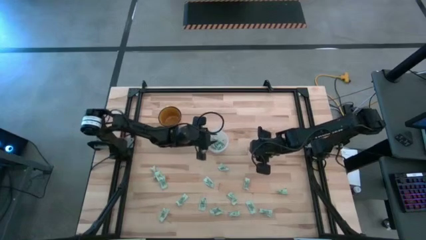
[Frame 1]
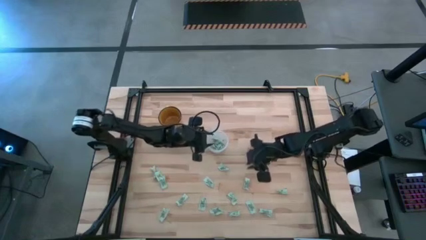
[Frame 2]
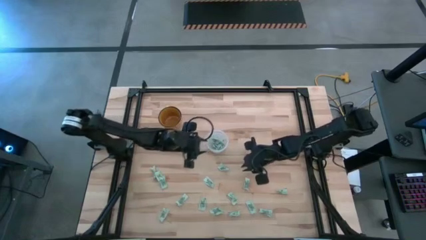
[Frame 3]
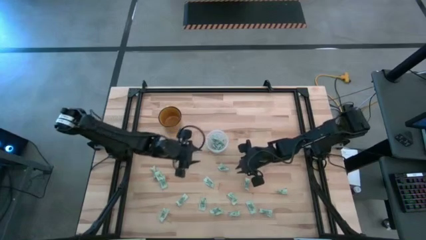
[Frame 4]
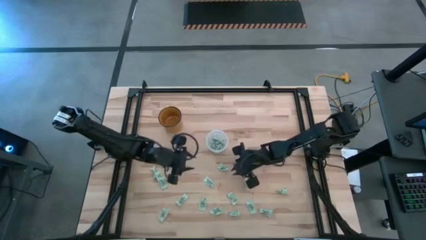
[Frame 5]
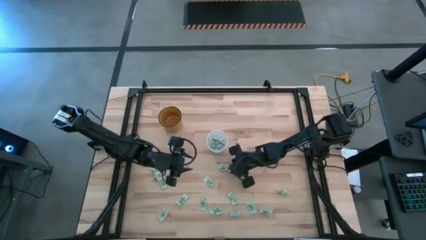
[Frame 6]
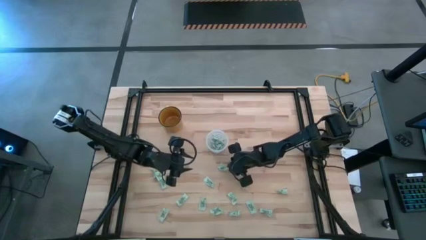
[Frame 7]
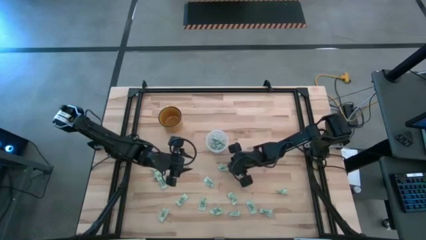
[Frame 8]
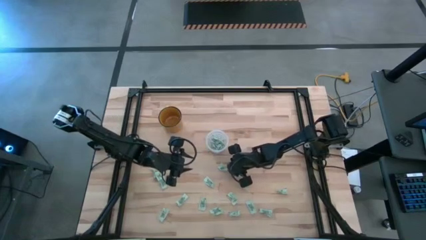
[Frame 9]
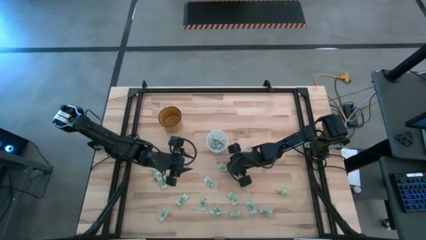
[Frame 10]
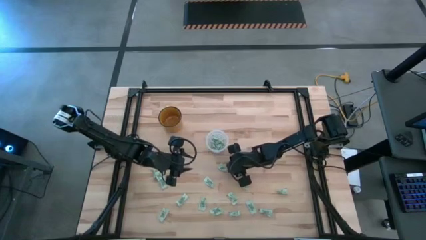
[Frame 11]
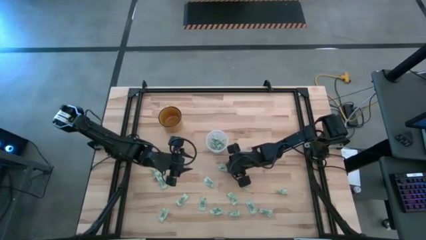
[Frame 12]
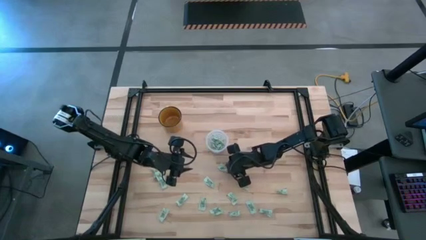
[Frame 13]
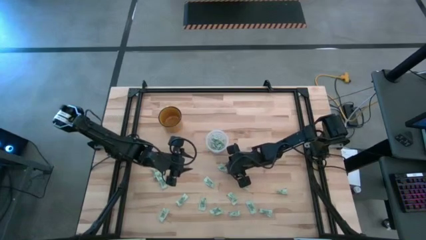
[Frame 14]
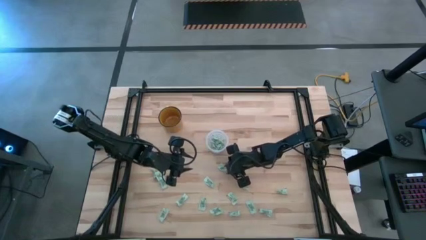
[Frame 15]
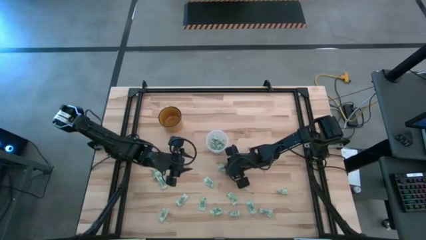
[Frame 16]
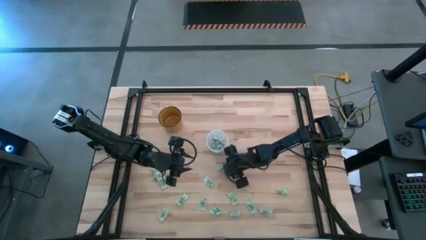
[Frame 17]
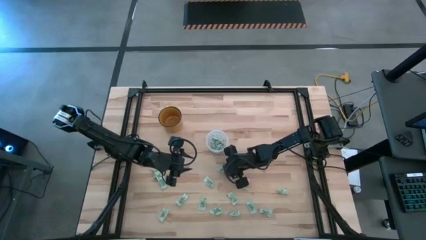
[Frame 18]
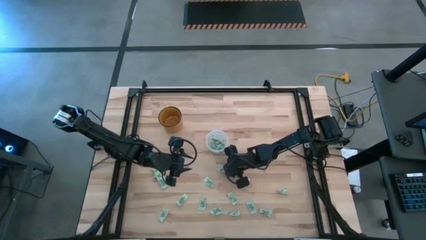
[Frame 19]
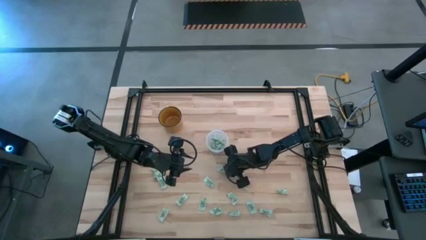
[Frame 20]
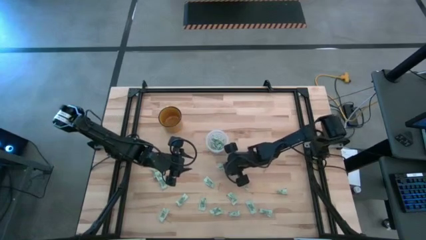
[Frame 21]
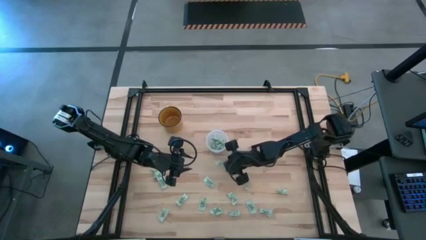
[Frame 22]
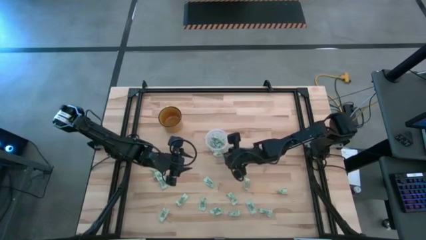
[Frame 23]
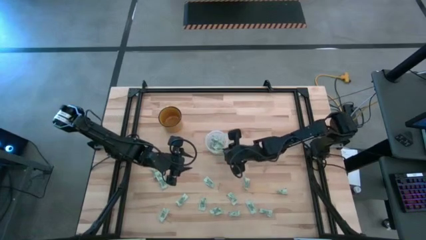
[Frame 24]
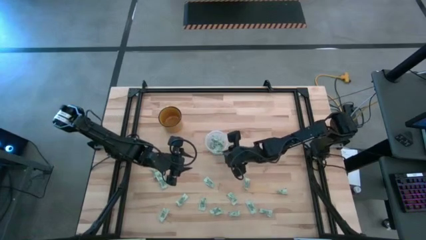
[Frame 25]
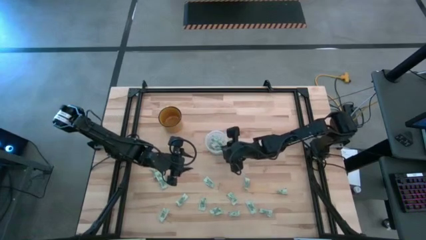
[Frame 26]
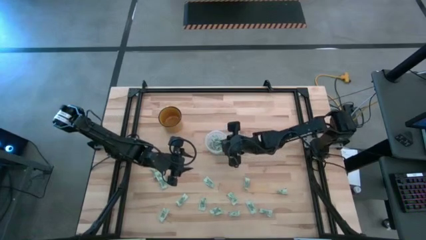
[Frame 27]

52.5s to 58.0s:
Task: Pick and place Stevia / Truvia into bins
Put the stevia packet into the transparent container

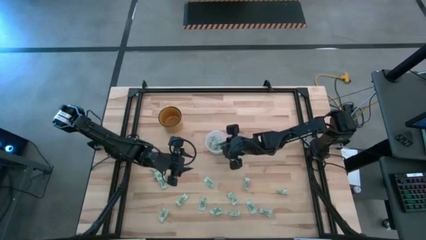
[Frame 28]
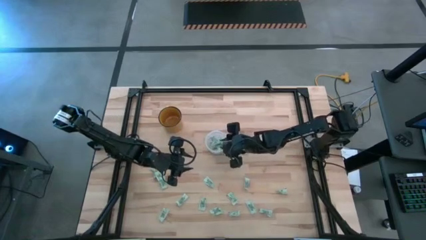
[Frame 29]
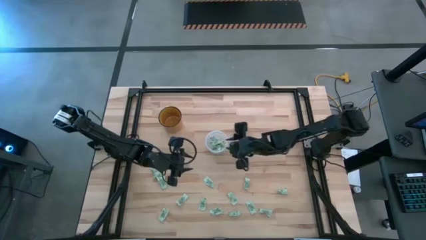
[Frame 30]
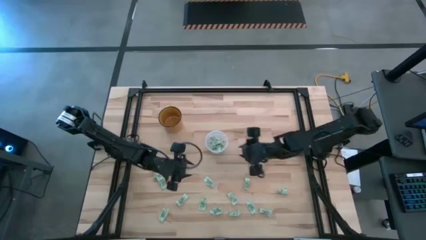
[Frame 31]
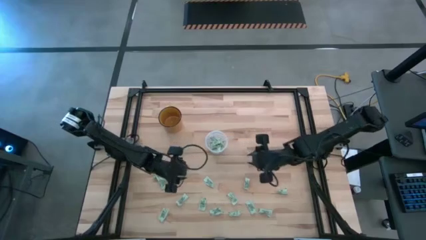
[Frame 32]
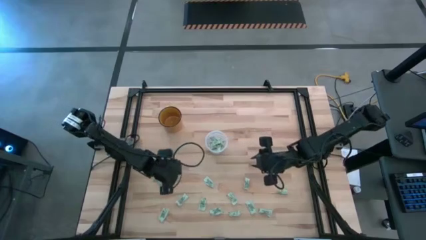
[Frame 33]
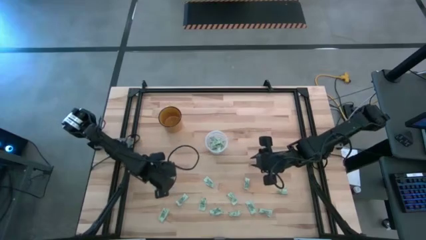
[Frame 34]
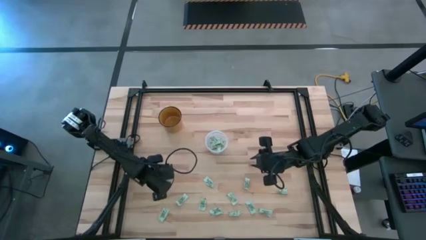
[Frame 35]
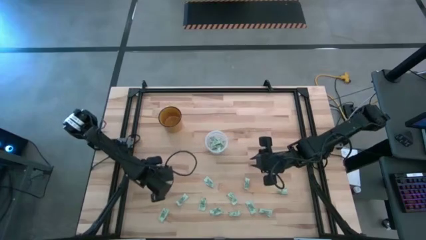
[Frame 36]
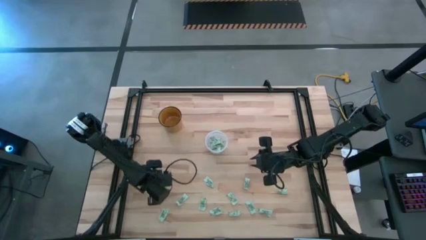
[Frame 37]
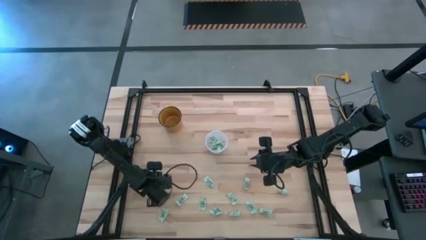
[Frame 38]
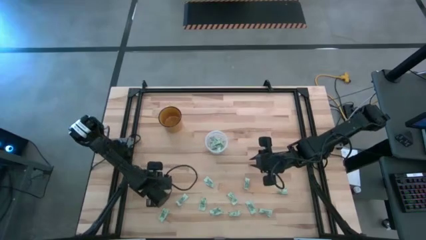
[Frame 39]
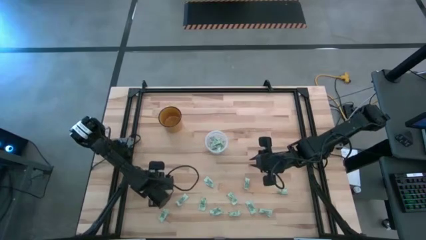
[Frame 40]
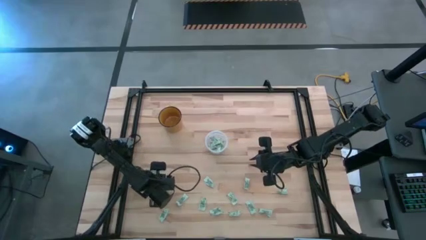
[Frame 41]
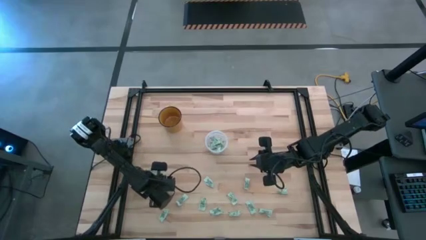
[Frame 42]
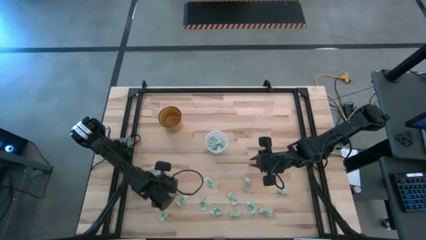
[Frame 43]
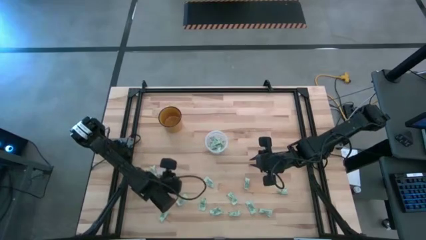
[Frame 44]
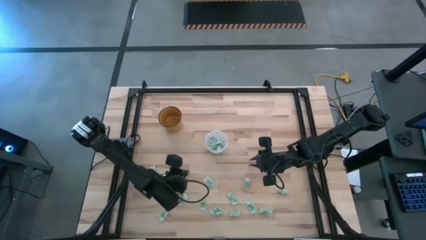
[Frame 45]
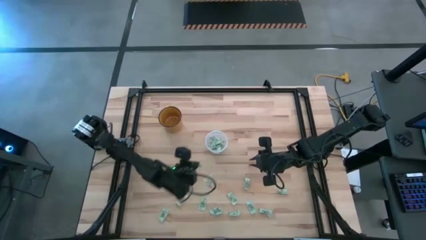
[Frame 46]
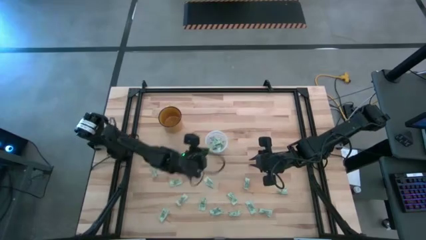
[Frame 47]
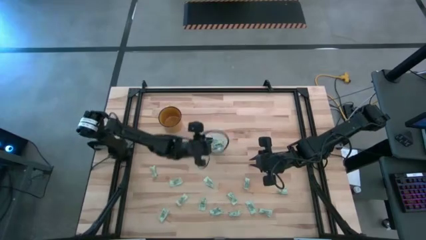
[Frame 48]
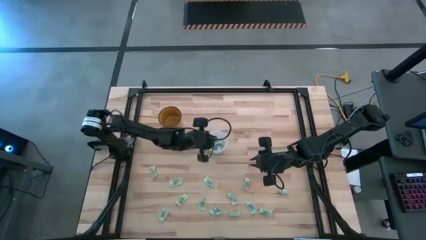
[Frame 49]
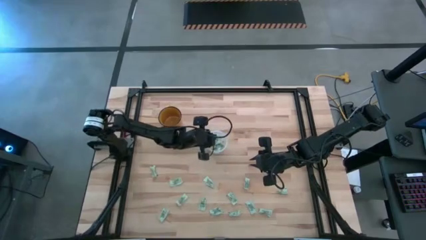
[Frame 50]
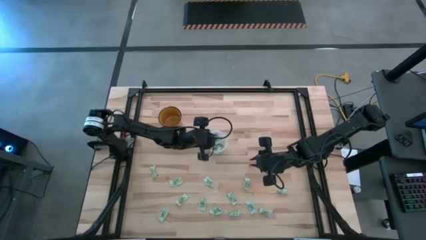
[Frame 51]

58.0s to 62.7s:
Put the stevia packet into the transparent container

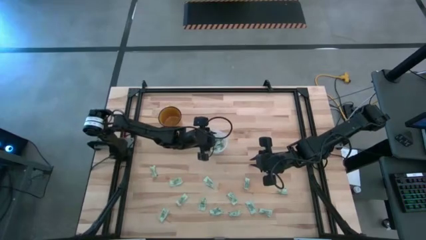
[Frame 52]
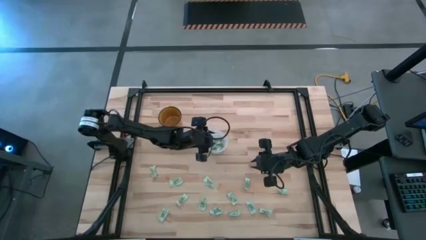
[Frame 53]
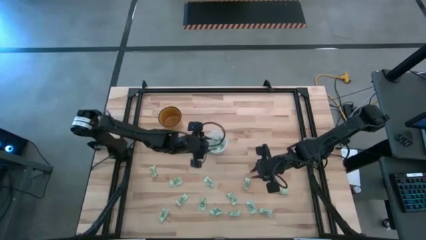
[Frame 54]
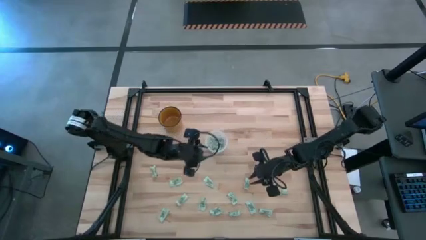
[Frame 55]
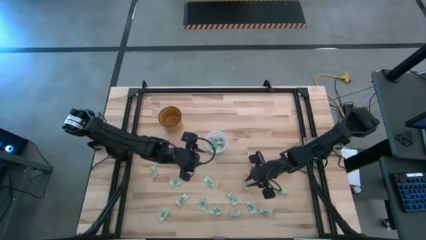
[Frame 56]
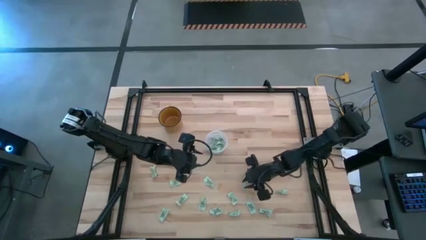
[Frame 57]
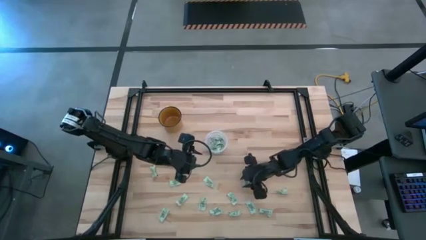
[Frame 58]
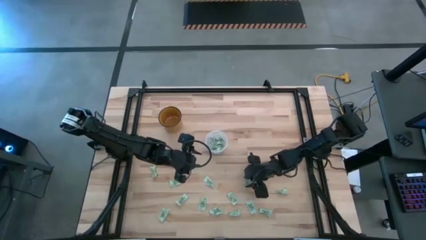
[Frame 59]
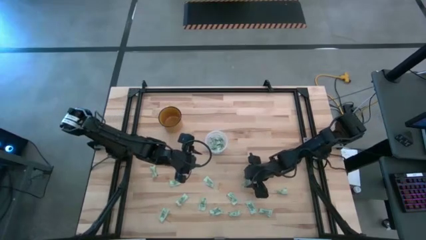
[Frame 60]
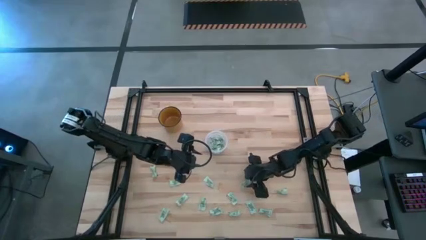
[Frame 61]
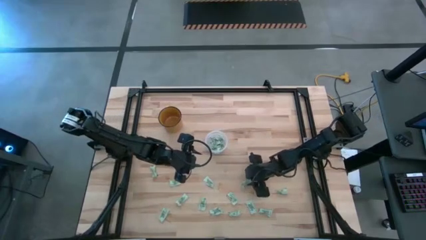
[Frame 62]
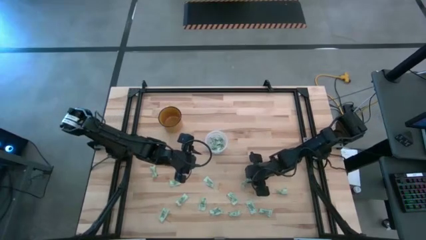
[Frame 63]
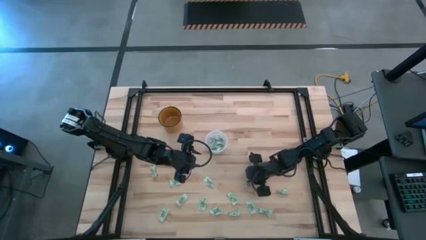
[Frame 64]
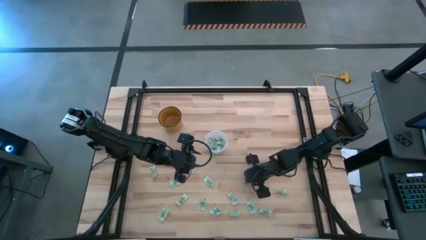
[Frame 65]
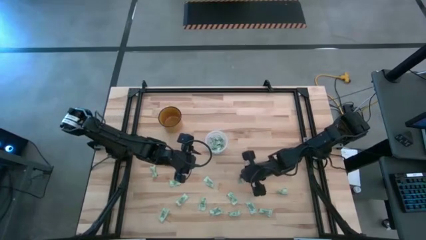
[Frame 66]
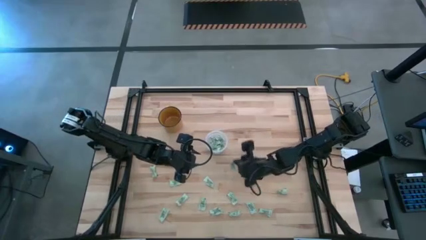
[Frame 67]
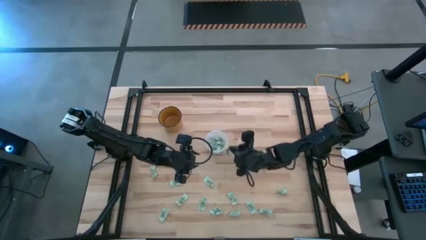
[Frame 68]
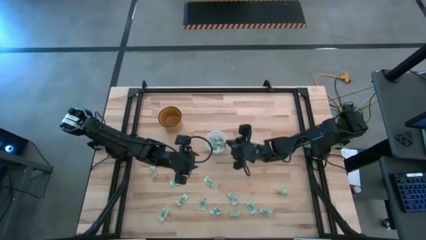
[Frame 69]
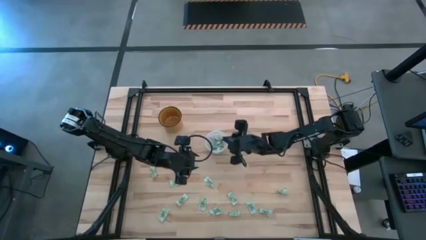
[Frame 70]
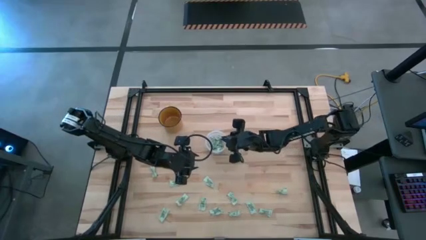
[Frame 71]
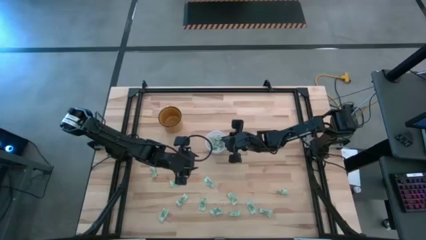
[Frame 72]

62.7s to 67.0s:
Put the stevia packet into the transparent container

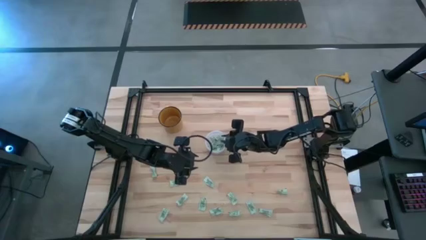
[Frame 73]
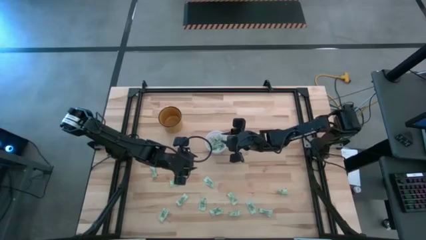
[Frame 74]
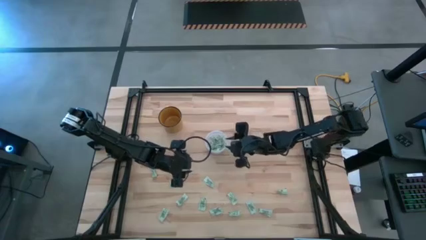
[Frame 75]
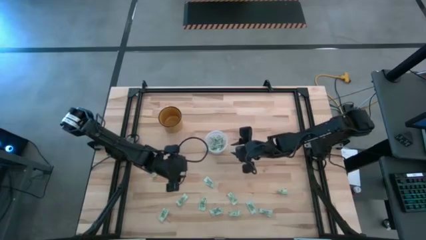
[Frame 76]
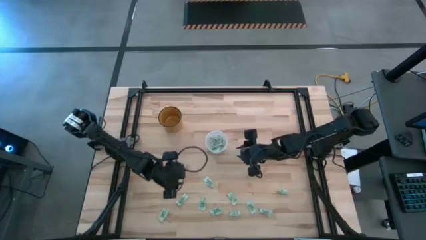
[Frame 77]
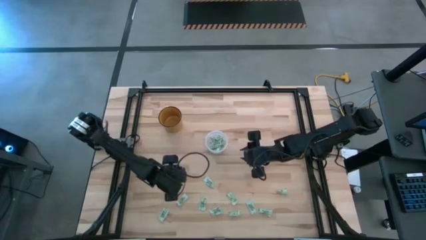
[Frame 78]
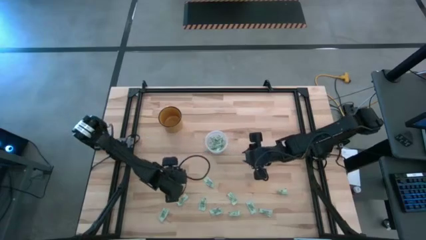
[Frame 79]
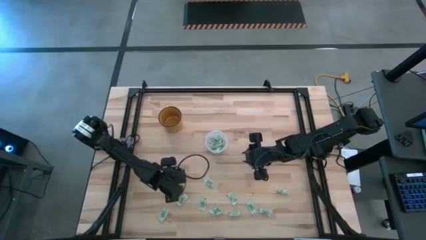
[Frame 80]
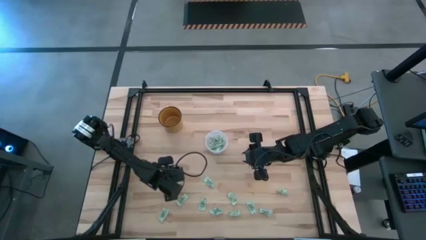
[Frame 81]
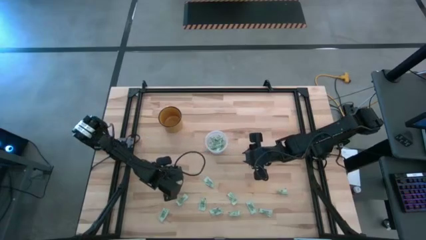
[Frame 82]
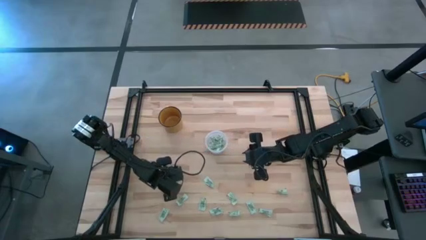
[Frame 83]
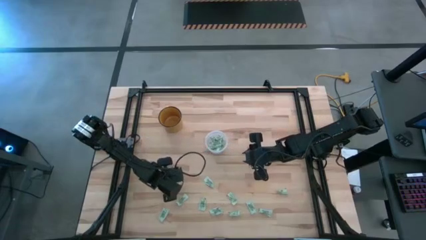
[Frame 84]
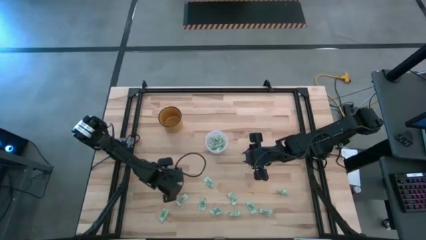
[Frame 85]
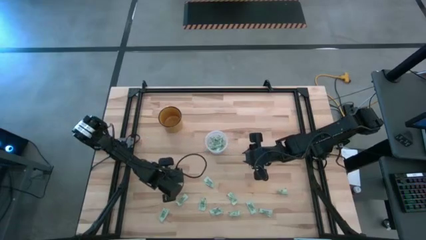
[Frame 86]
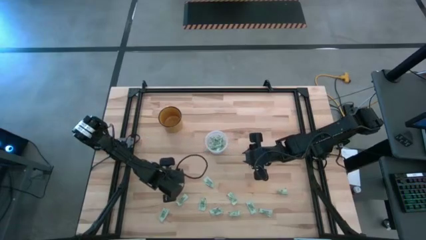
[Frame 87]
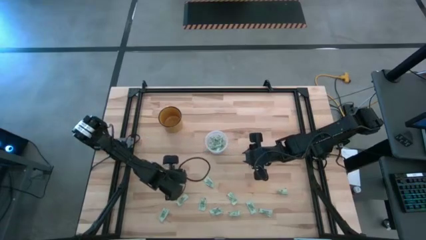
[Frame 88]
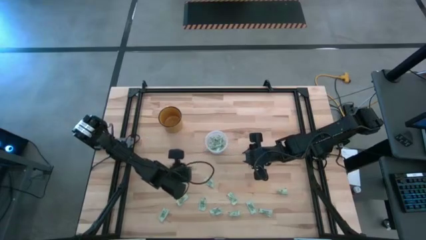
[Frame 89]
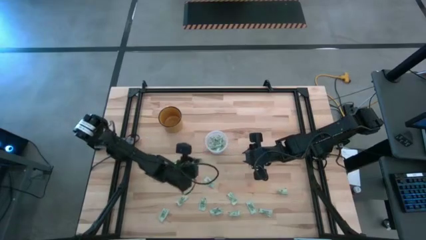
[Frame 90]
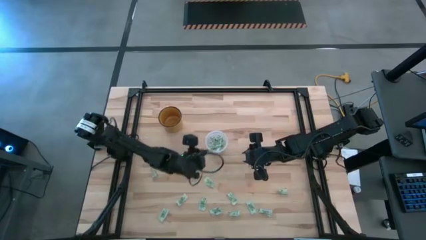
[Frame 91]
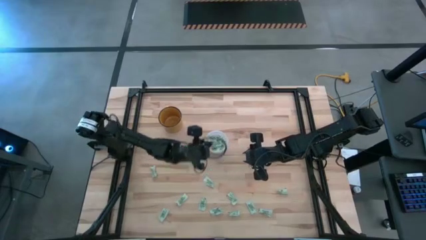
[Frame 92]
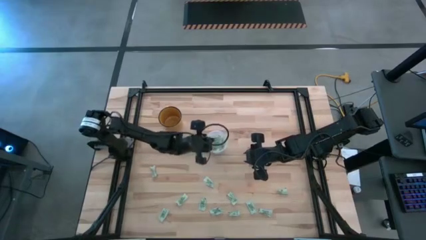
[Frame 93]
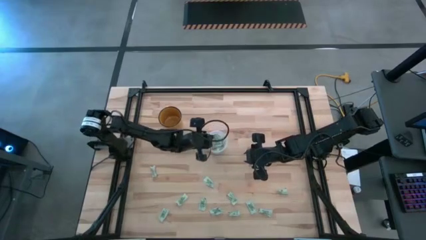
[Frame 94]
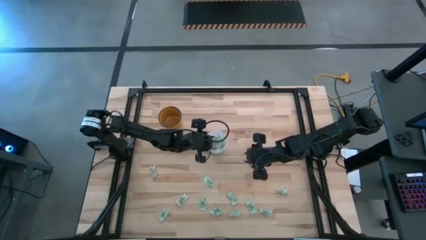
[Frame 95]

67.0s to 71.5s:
Put the stevia packet into the transparent container
